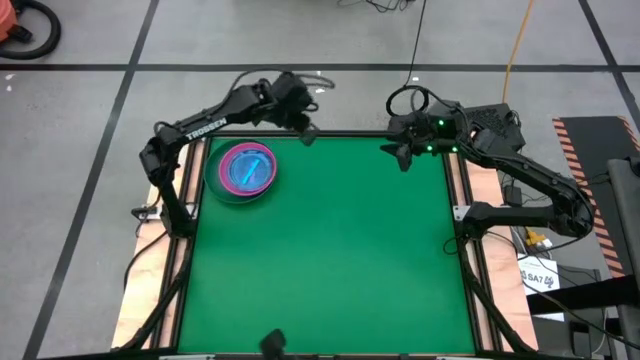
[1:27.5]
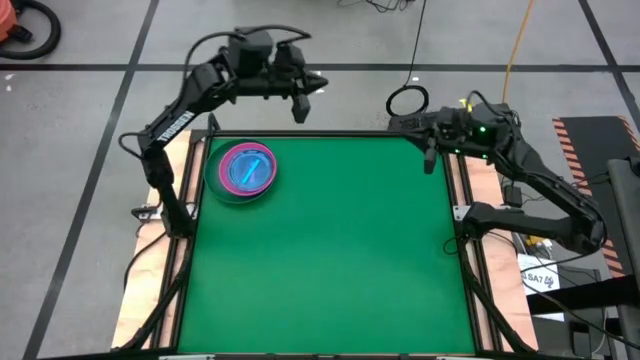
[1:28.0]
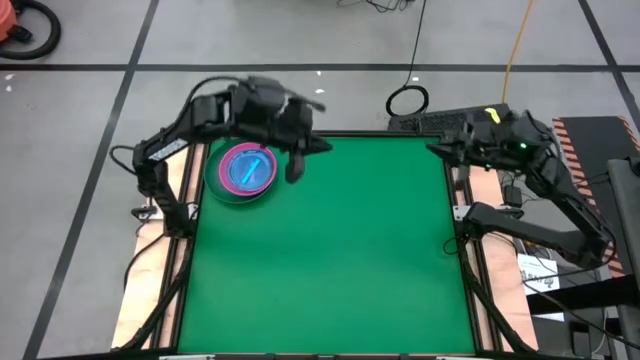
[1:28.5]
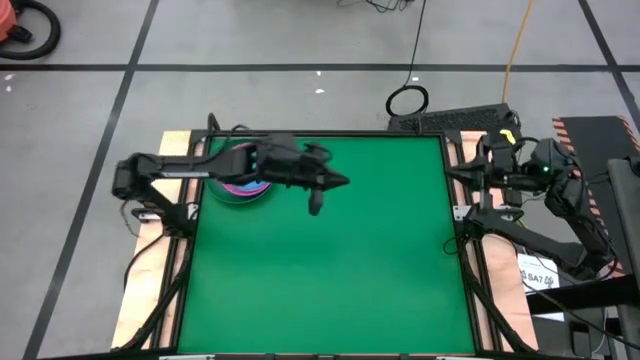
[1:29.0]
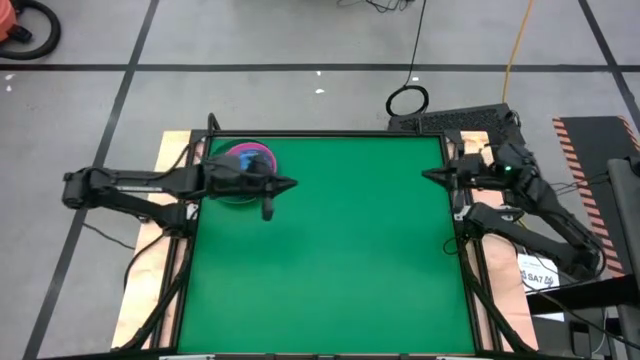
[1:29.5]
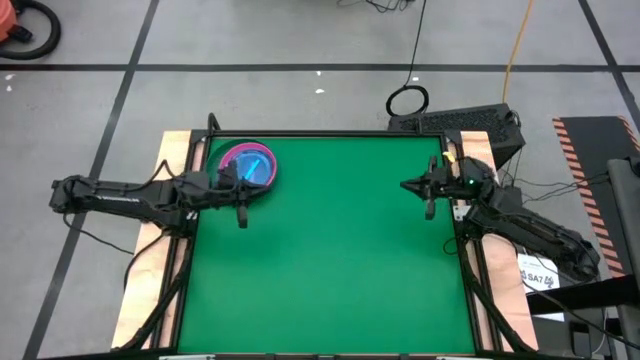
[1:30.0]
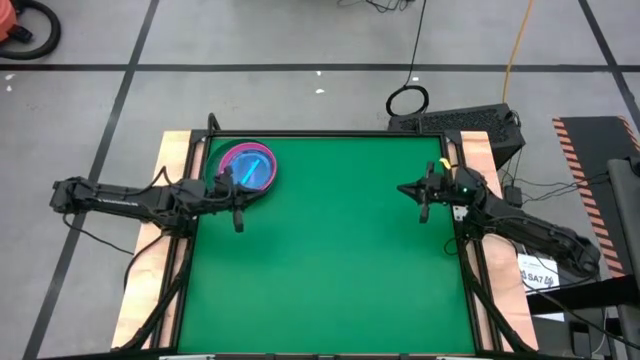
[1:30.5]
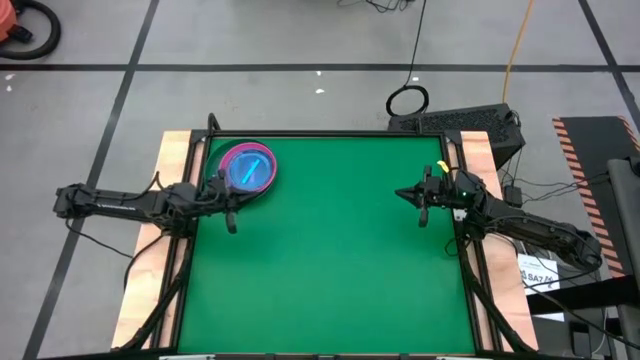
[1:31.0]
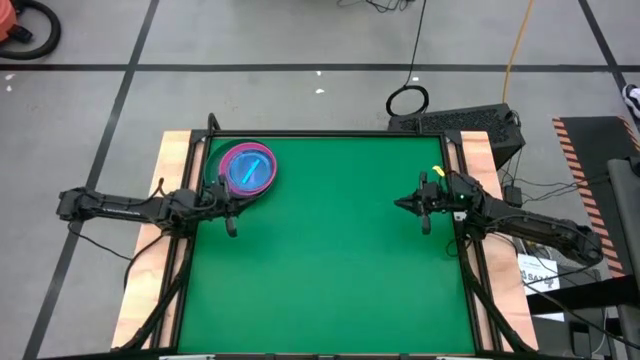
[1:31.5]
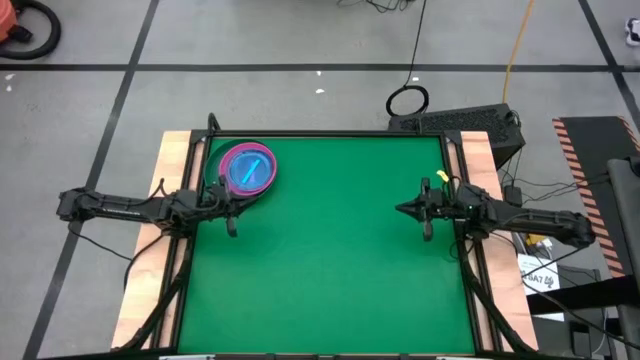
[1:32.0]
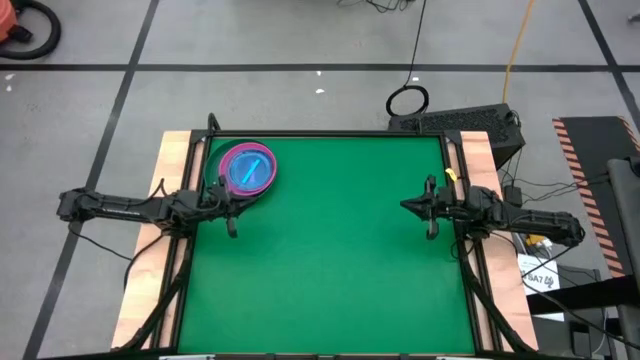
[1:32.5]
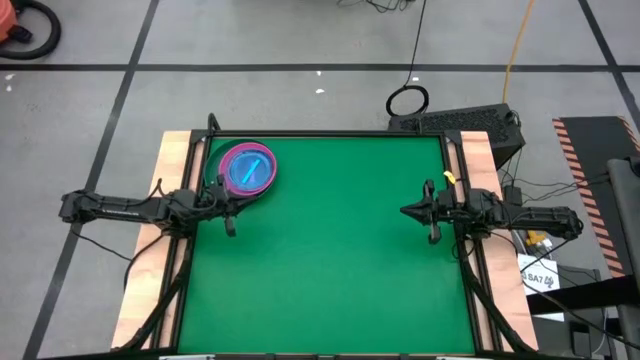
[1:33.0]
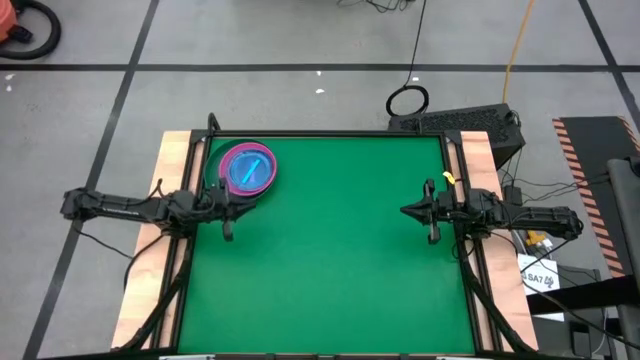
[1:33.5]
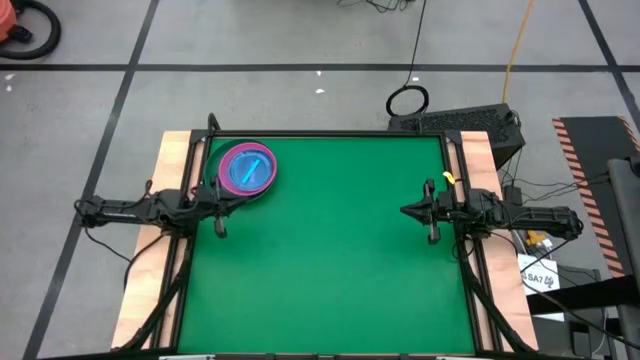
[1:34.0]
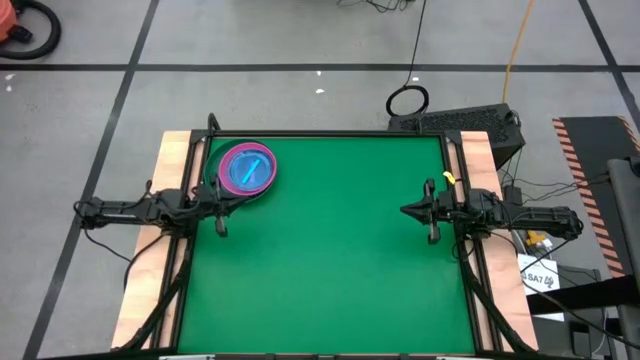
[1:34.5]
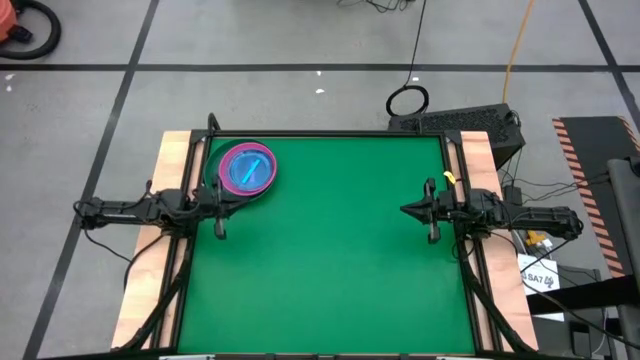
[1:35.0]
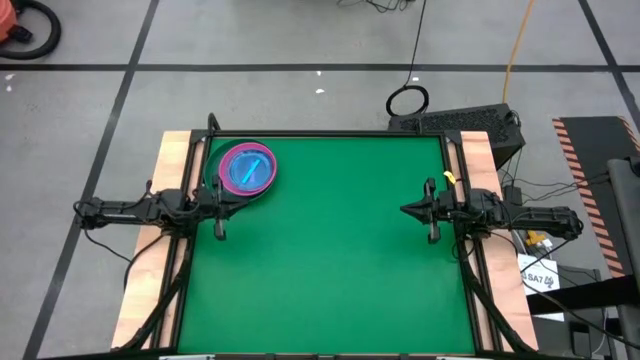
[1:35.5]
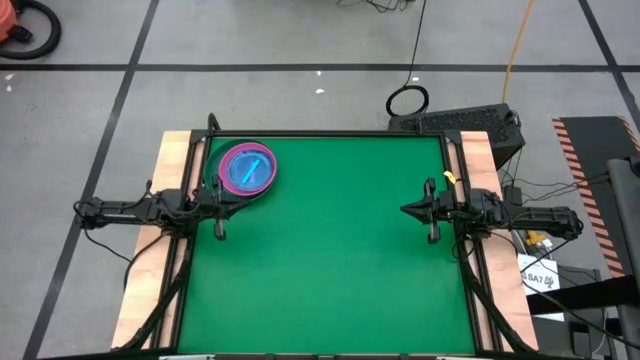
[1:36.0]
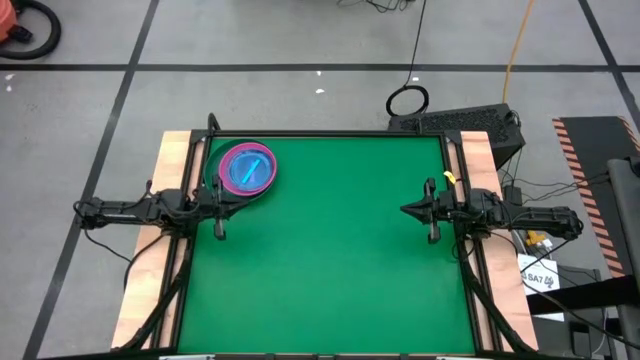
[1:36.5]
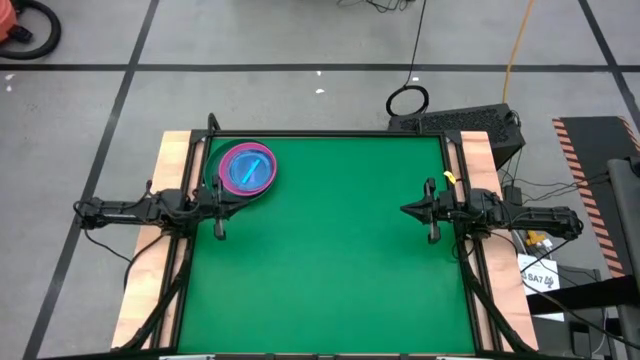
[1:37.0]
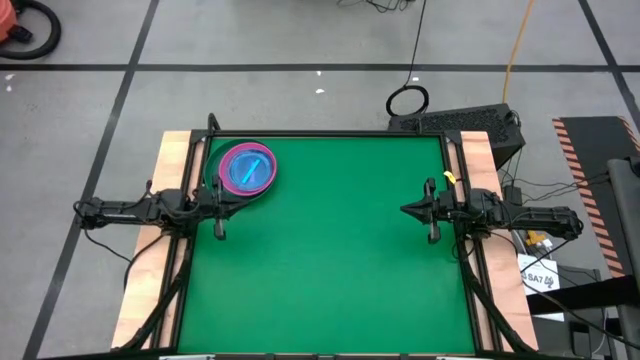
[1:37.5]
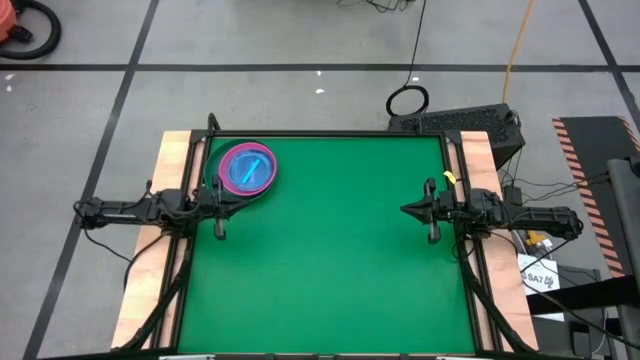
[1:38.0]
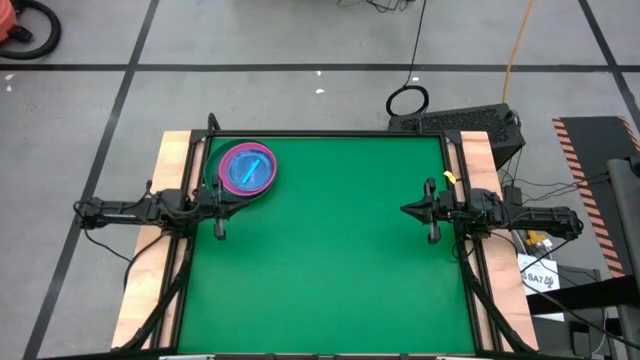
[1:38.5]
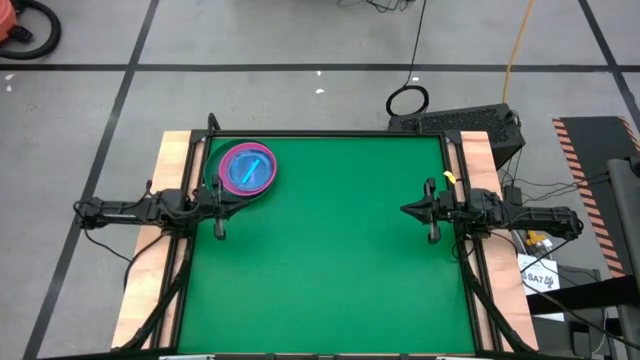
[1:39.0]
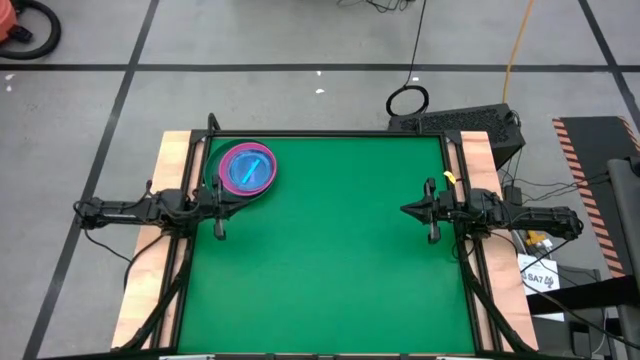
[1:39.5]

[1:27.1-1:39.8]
Task: Stack plastic plates
Return to Home Position

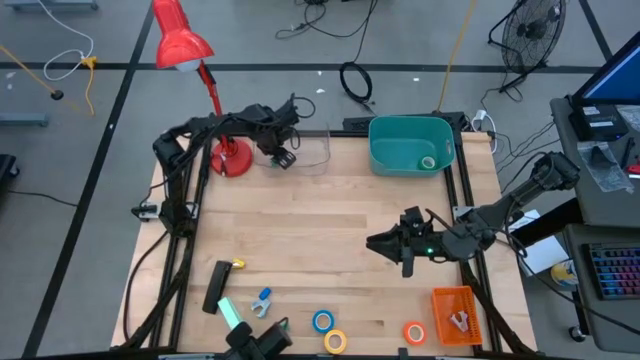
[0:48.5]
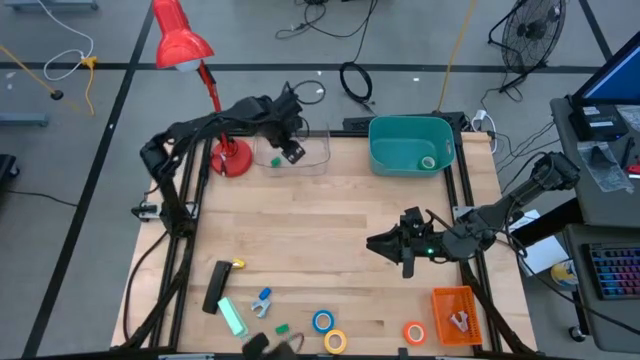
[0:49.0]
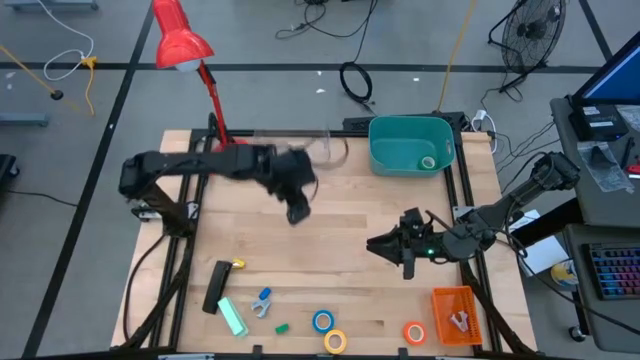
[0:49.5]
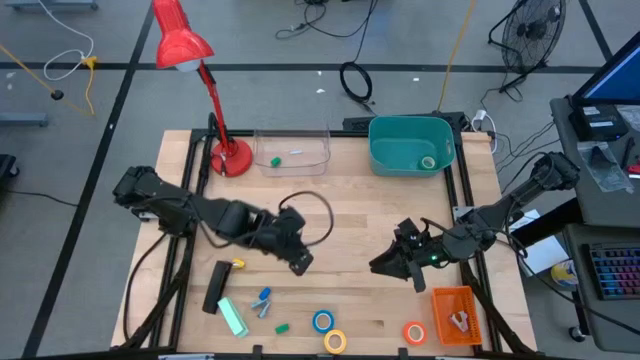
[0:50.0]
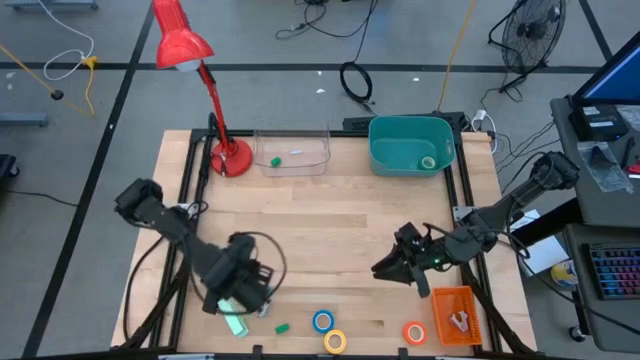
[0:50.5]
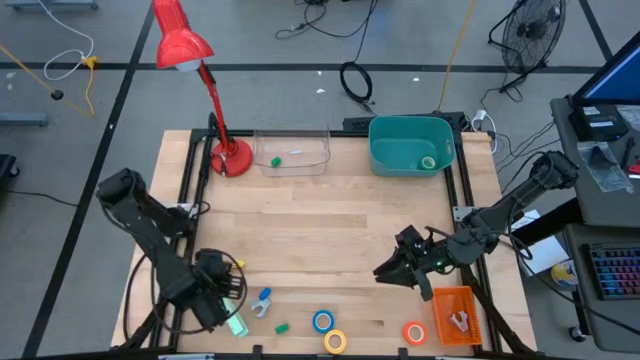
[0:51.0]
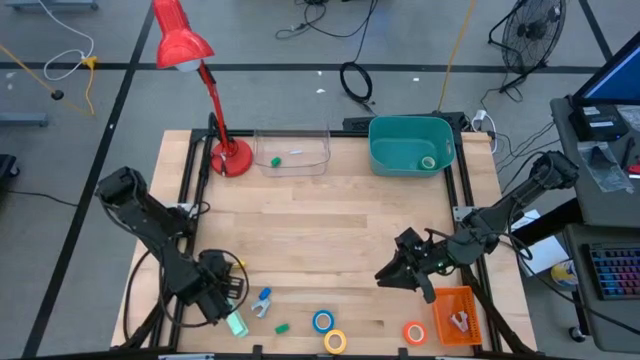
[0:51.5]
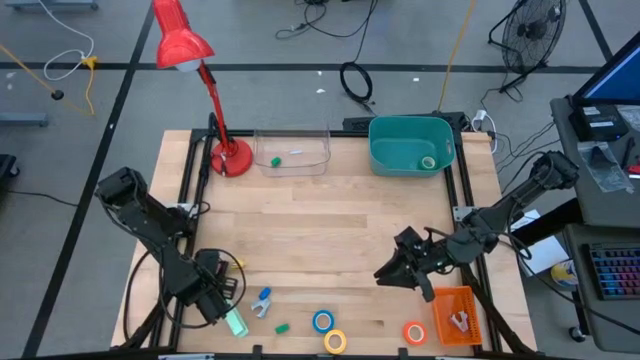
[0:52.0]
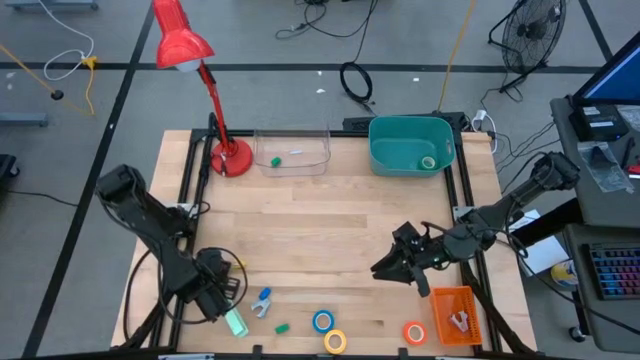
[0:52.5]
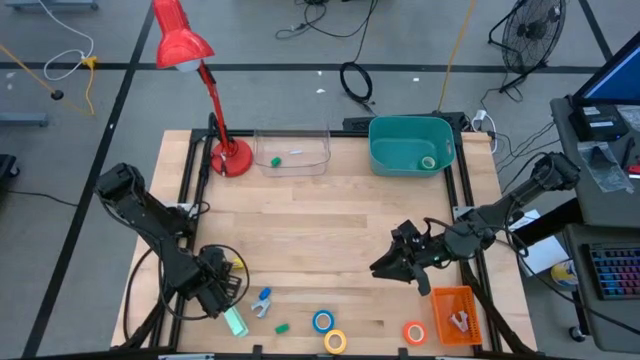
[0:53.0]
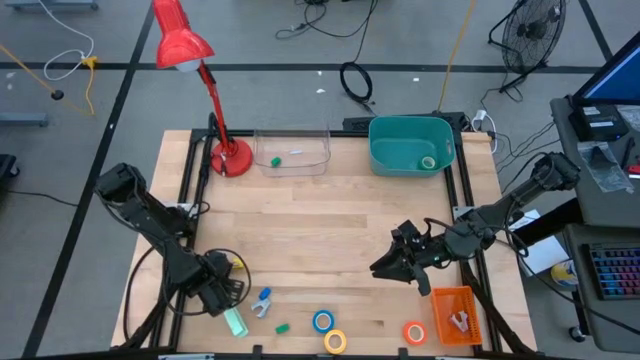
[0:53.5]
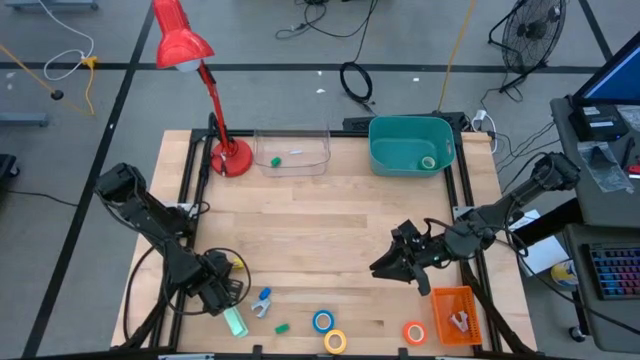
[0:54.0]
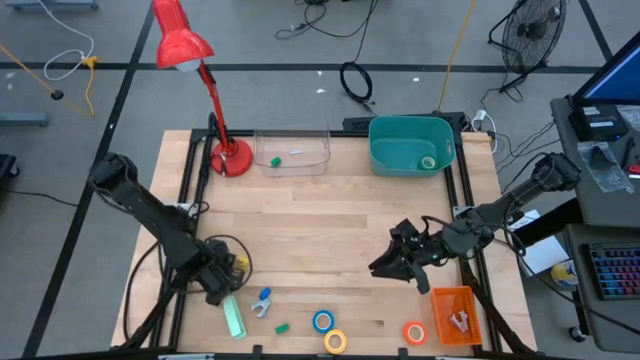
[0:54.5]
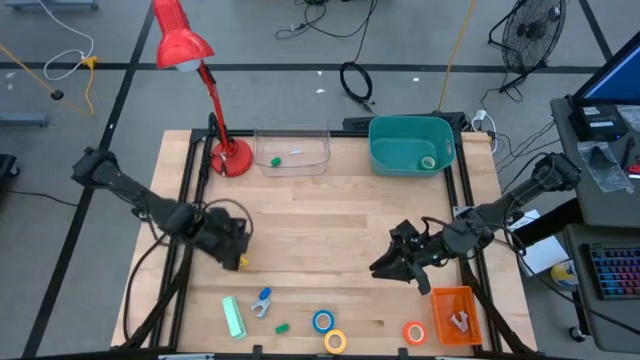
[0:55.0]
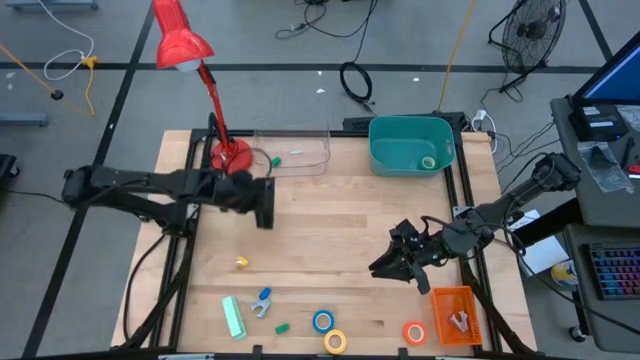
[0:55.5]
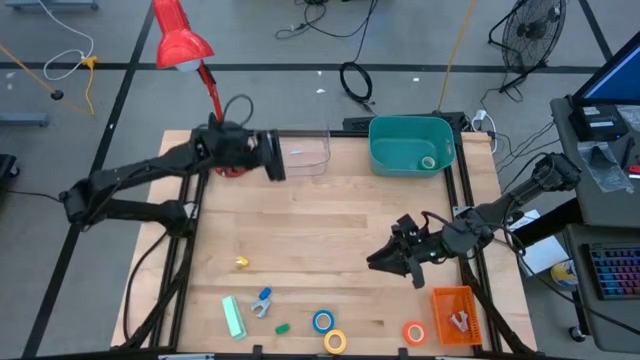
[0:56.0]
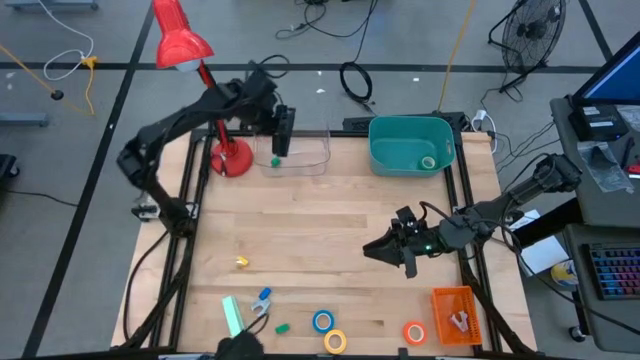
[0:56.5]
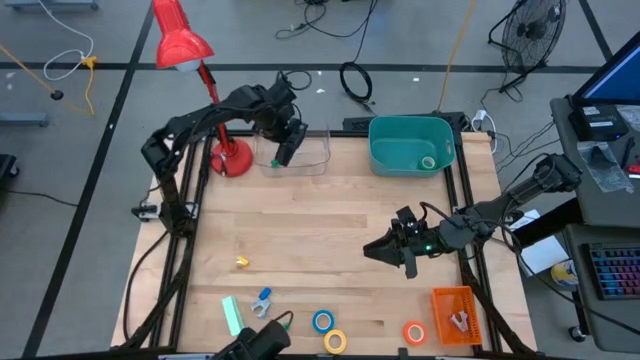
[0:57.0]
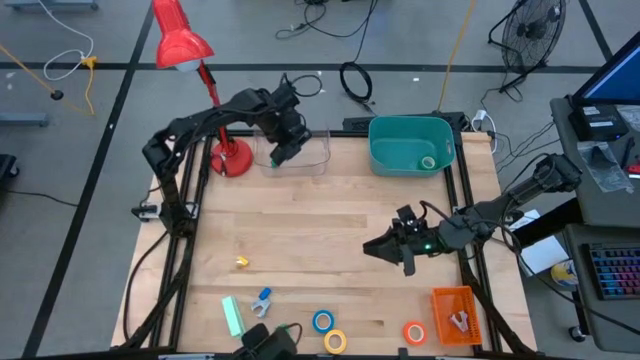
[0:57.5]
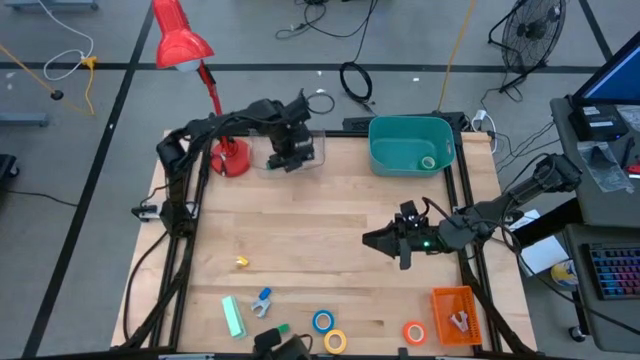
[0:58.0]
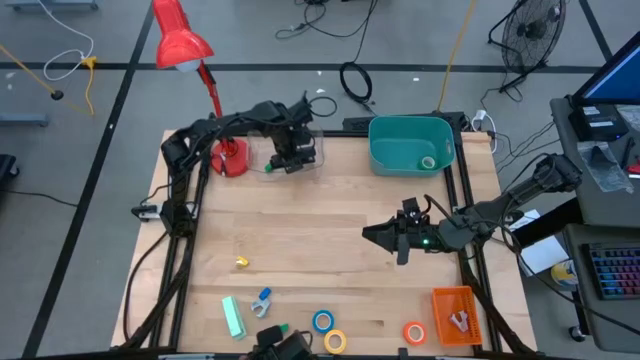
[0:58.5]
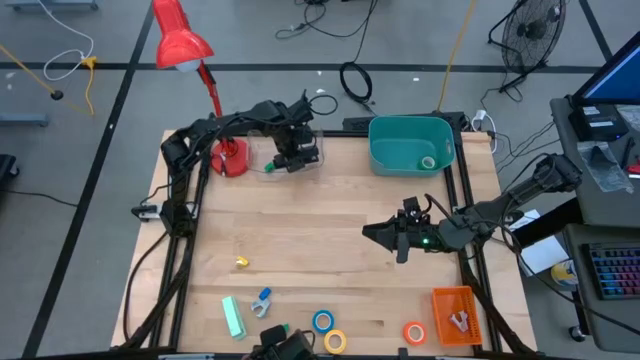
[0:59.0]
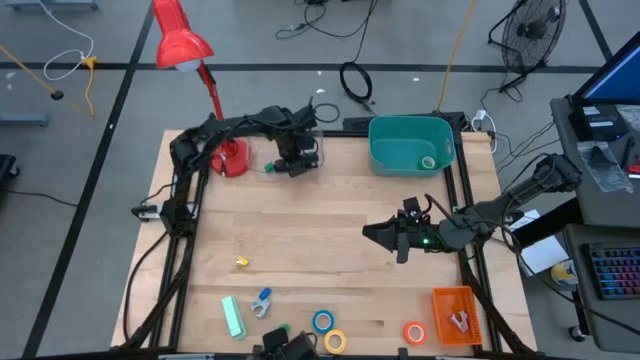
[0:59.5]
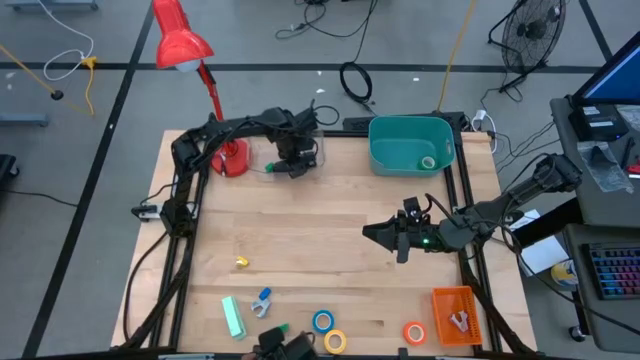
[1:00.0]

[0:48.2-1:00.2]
Task: Pick and place Stapler, Stapler remover, tape
Put the big black stapler into the transparent bin
